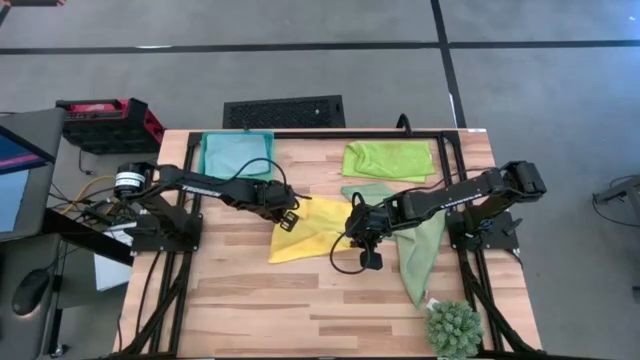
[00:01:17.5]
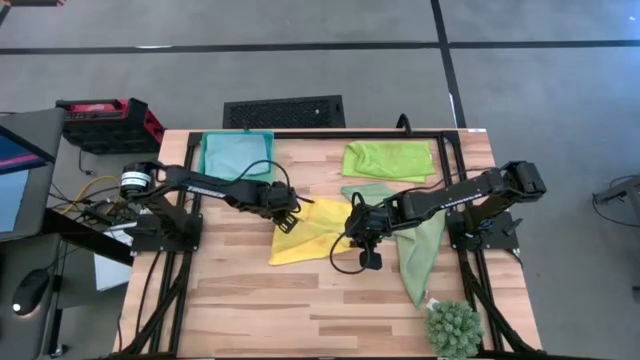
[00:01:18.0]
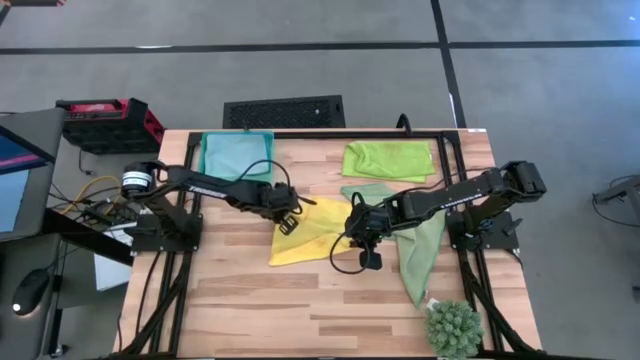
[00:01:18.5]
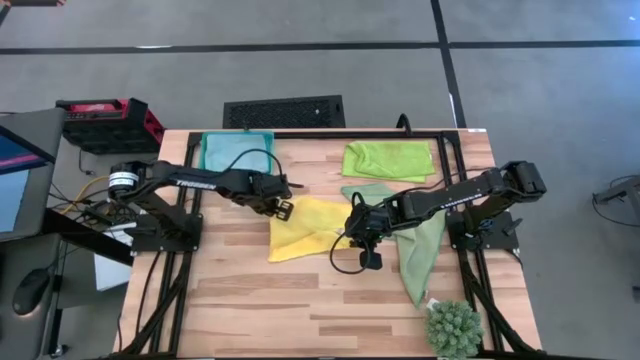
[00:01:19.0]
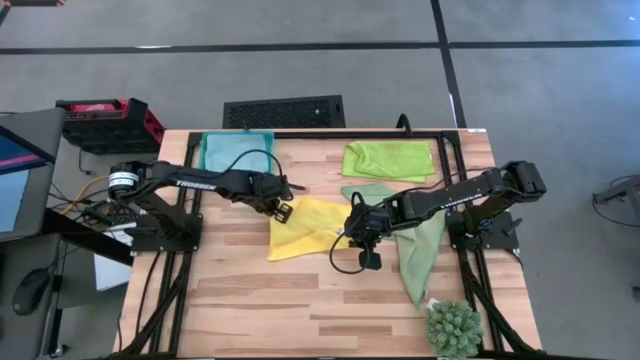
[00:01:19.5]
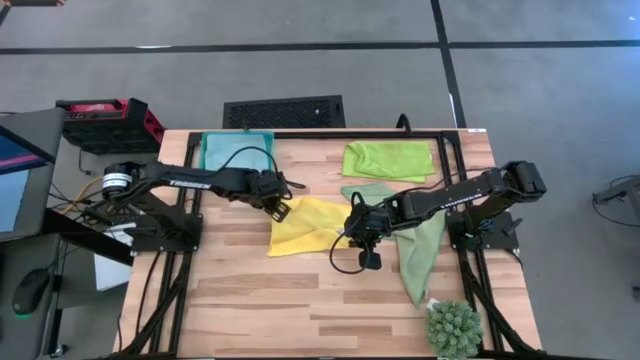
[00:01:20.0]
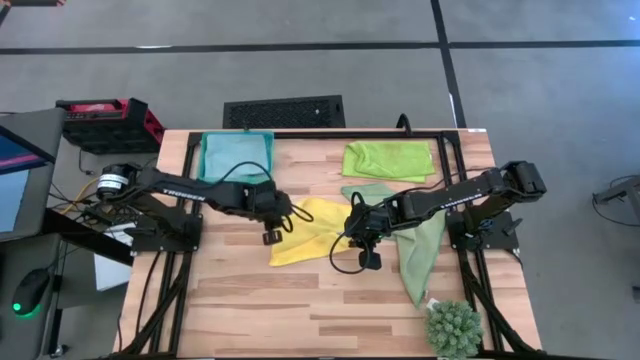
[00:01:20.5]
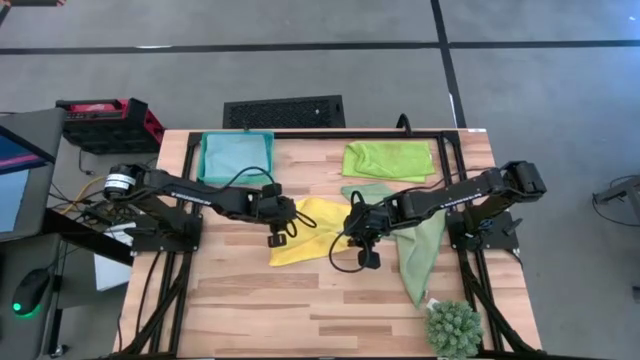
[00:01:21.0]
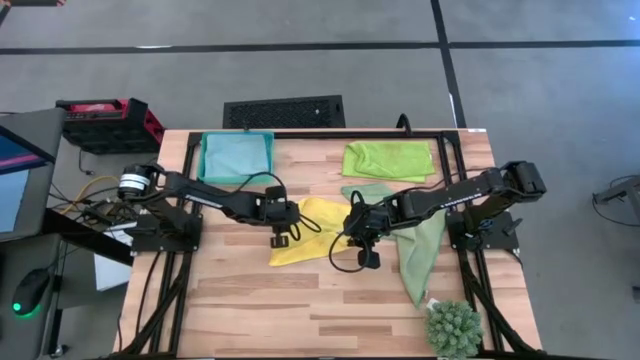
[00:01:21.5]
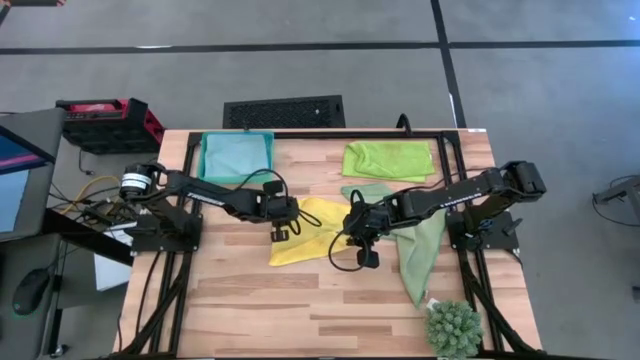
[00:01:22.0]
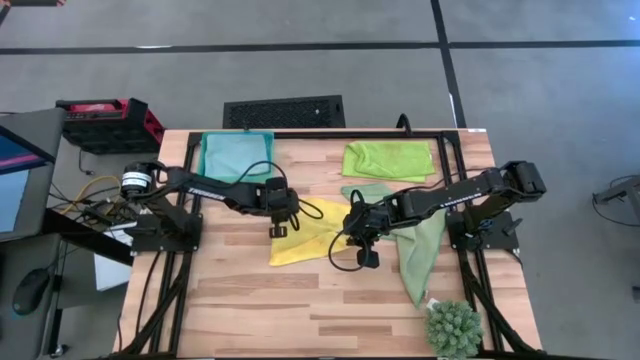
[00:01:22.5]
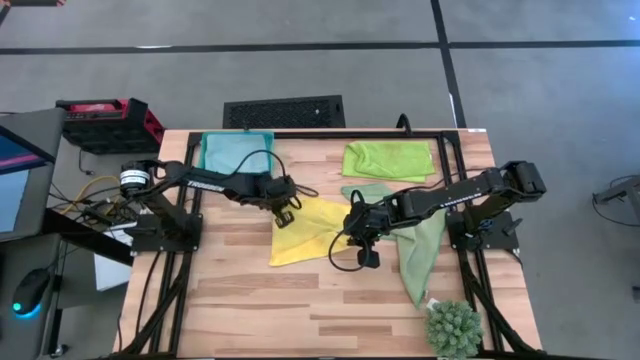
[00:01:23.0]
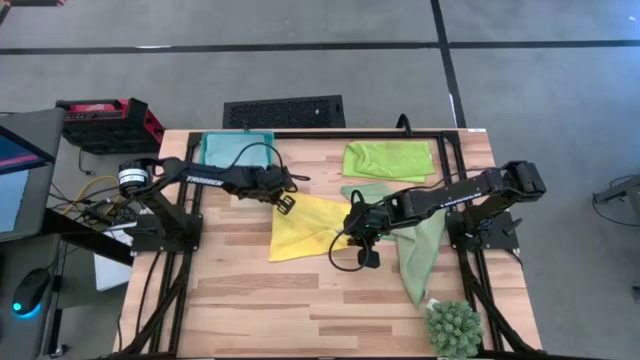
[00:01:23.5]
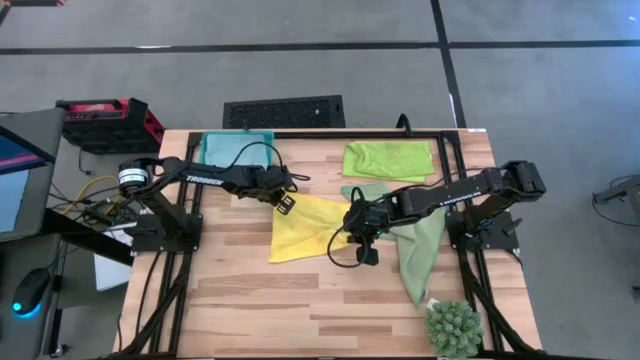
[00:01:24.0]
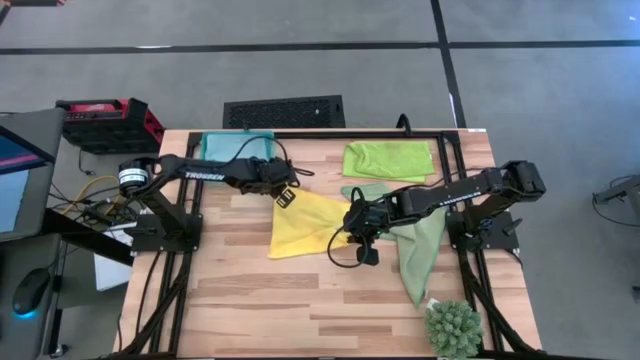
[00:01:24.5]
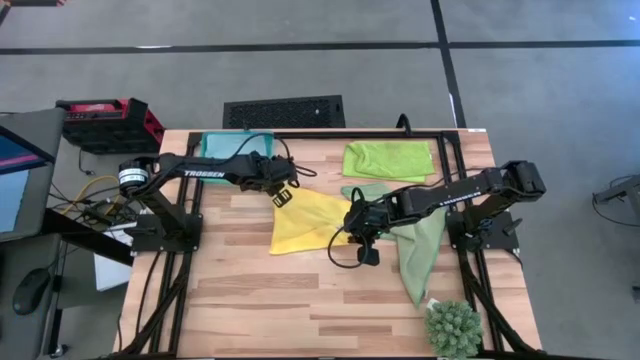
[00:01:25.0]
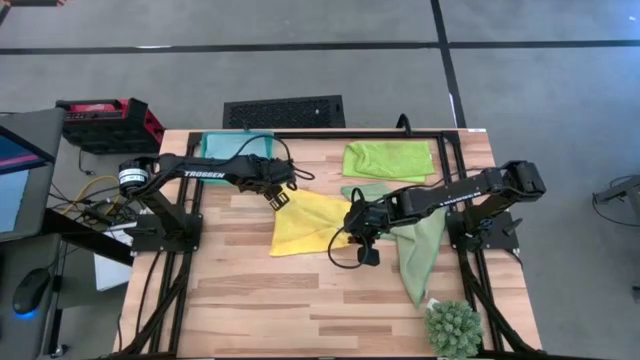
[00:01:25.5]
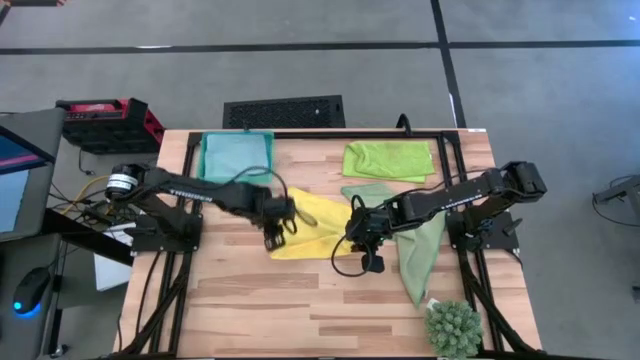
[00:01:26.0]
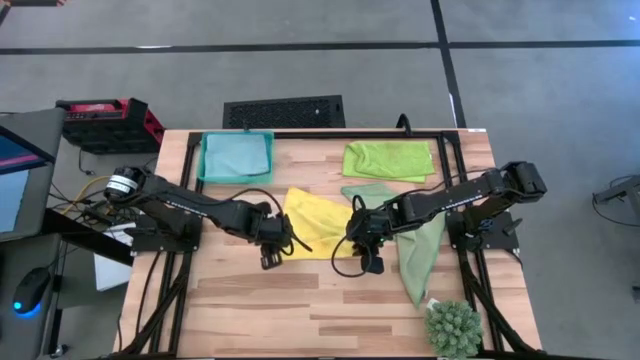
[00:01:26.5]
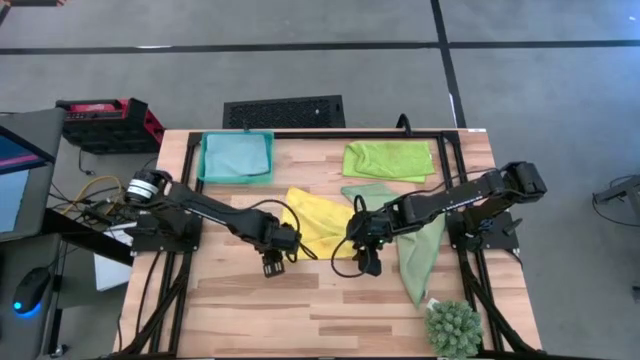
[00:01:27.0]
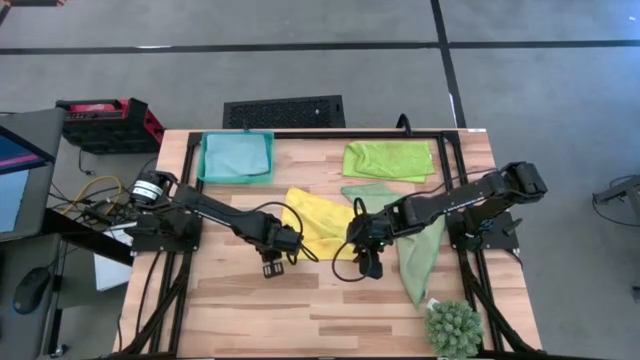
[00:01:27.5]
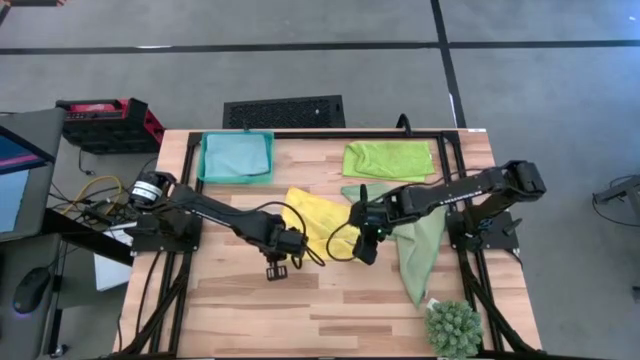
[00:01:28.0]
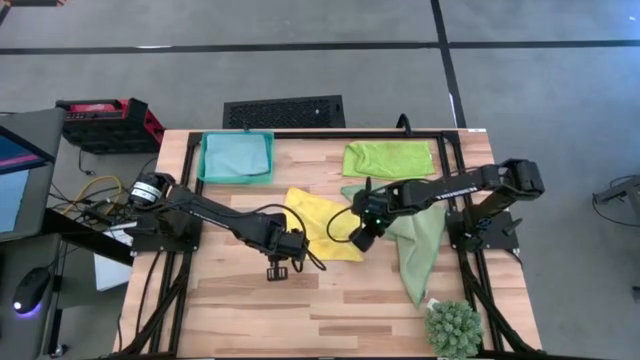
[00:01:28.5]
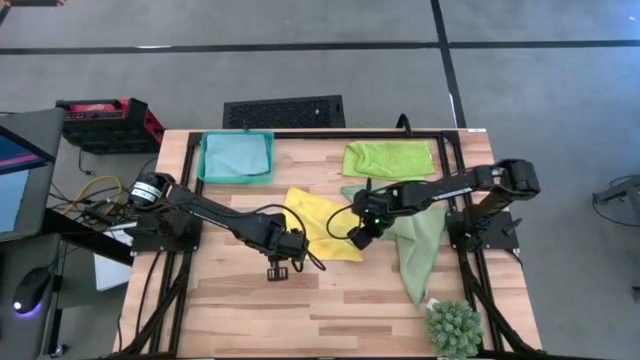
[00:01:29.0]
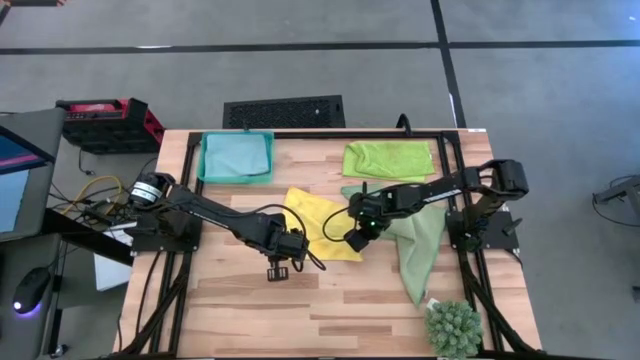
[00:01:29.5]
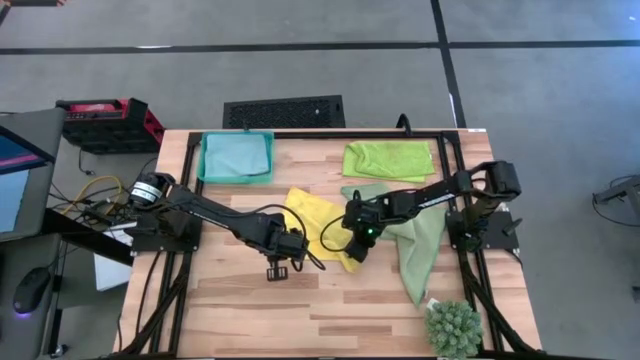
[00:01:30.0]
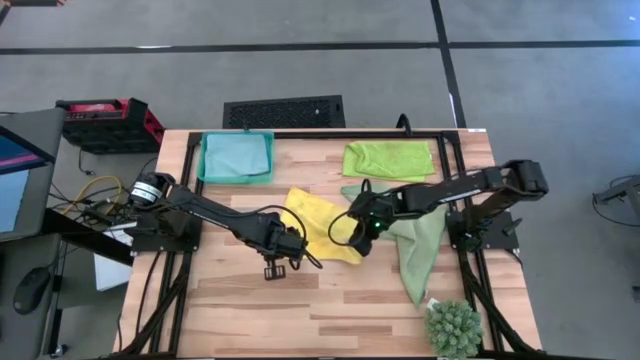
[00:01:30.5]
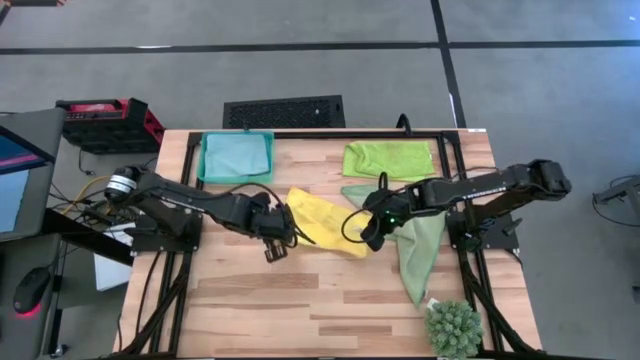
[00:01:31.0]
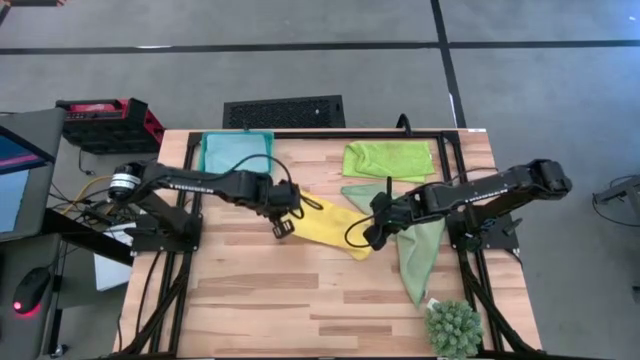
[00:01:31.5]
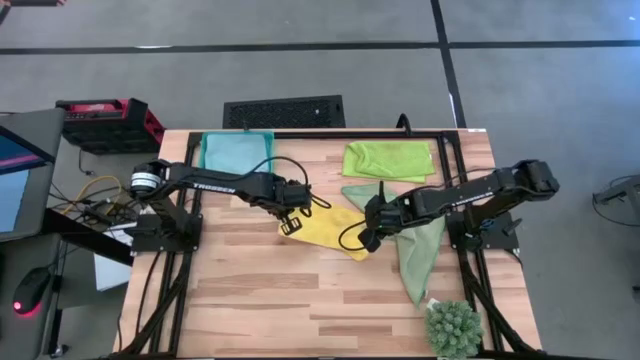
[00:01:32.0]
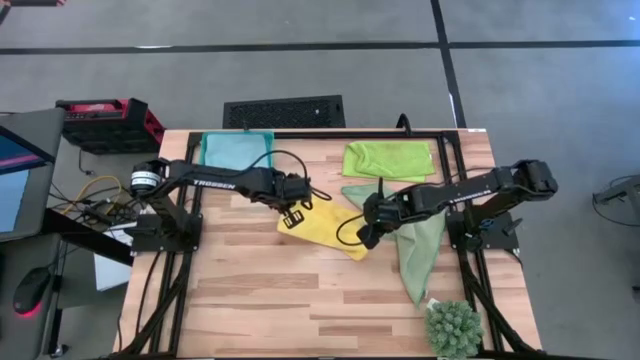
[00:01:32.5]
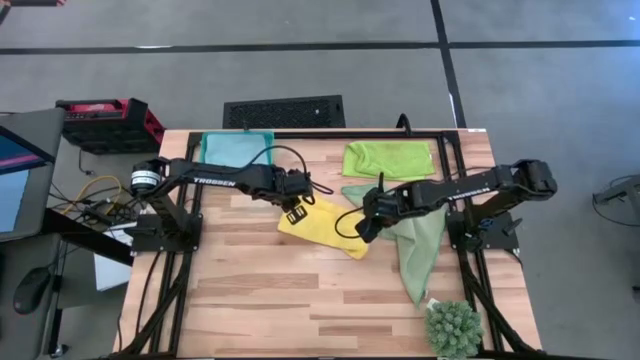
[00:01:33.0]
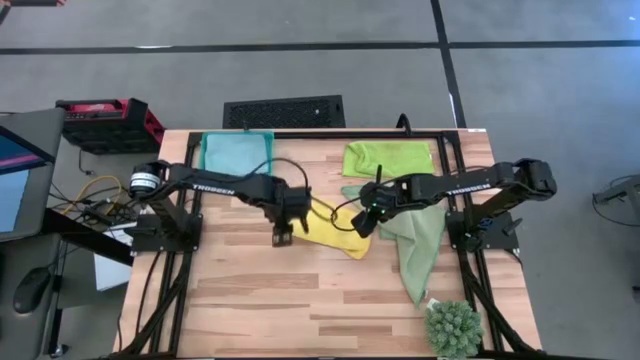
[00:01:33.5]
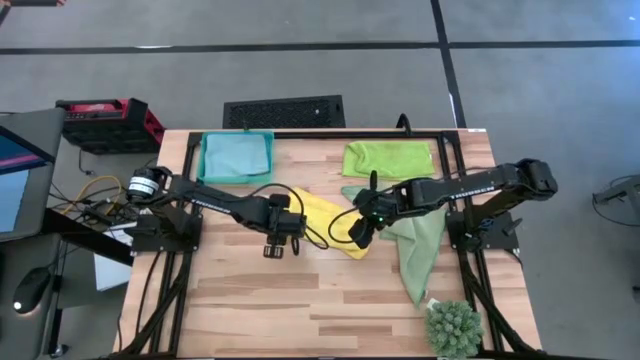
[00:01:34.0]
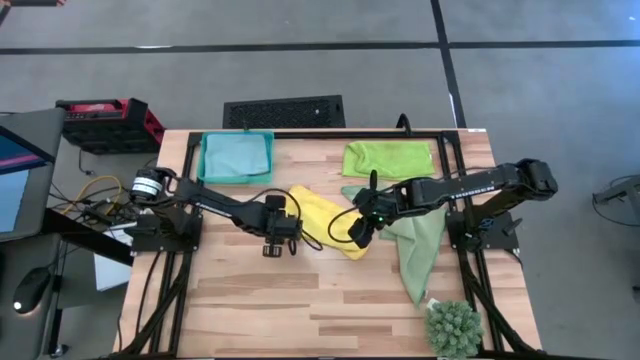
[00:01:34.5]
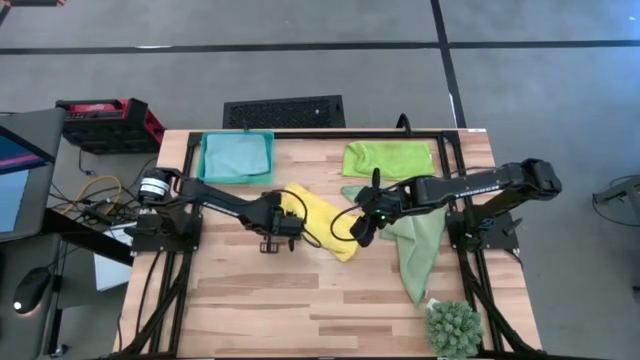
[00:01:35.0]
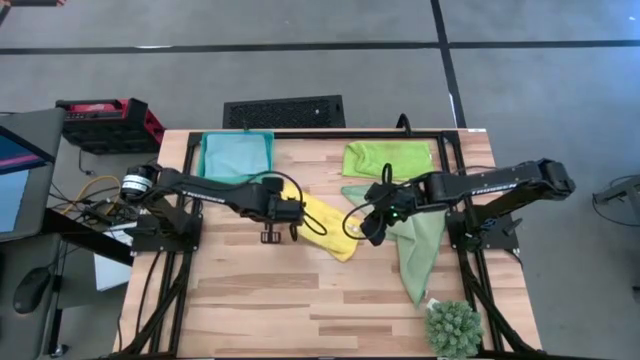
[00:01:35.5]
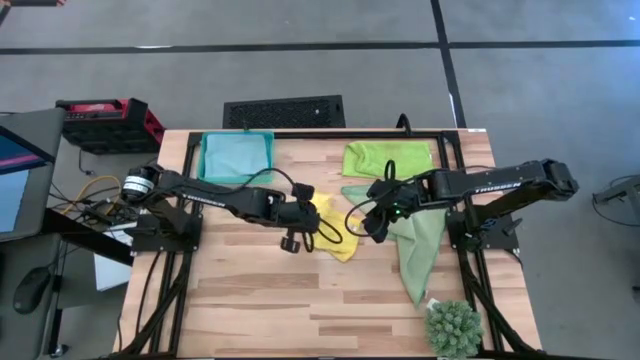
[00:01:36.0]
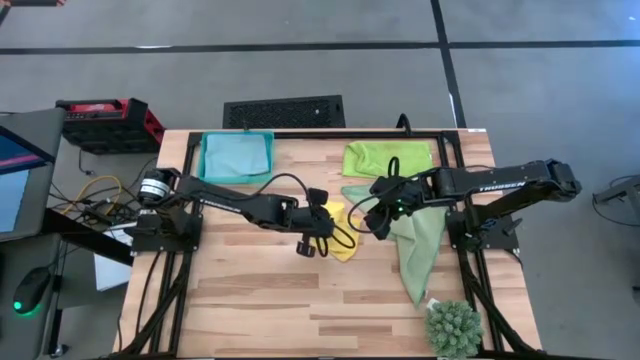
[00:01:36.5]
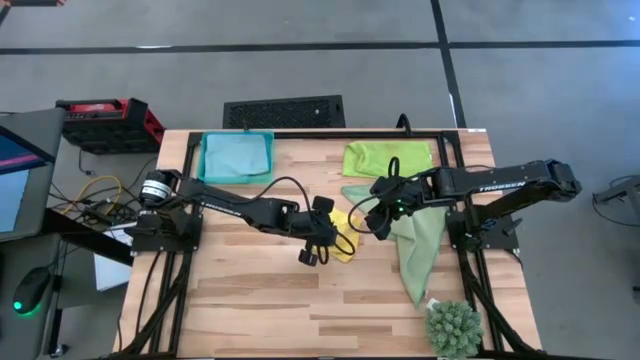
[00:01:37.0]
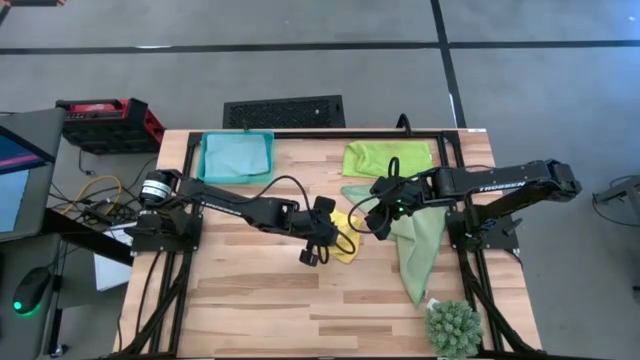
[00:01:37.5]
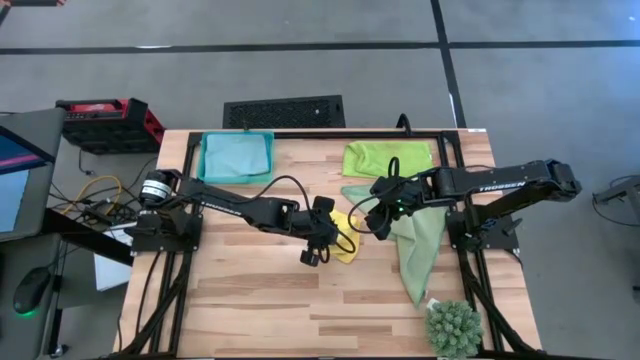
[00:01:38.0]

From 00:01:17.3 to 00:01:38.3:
Task: Fold microfiber towels
Fold the yellow microfiber towel
